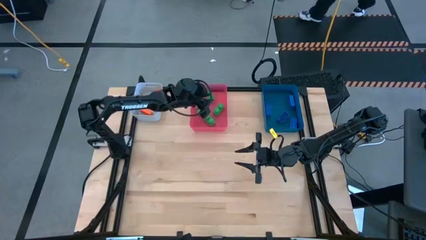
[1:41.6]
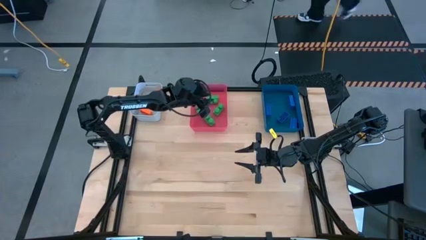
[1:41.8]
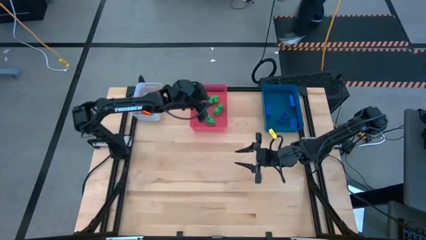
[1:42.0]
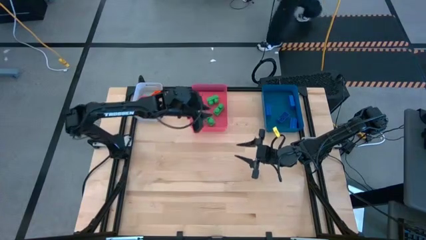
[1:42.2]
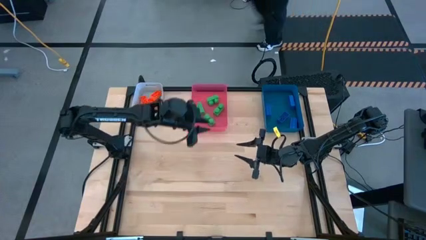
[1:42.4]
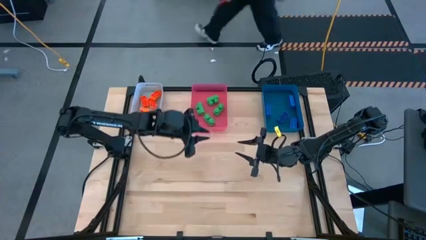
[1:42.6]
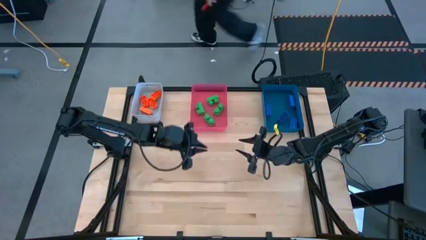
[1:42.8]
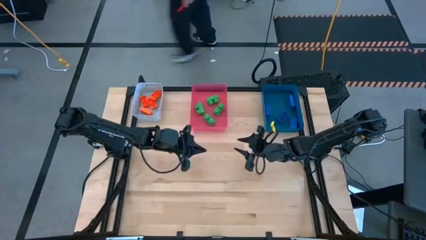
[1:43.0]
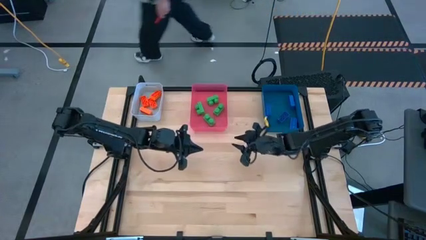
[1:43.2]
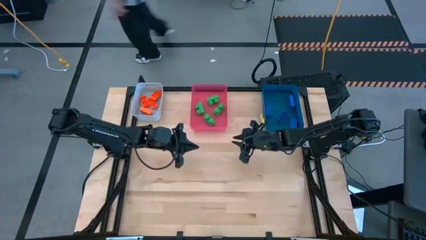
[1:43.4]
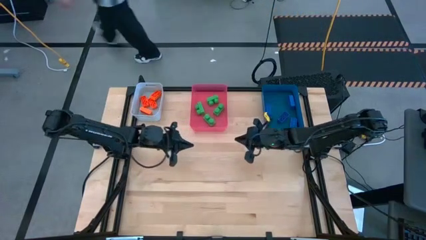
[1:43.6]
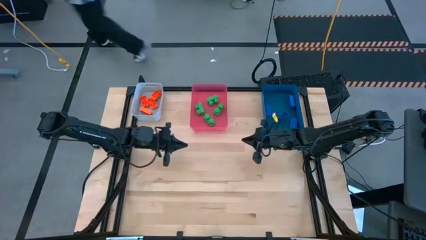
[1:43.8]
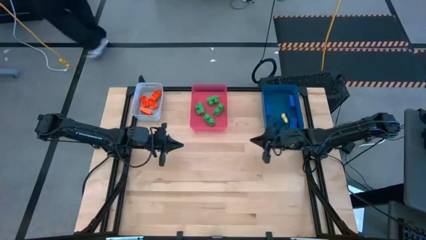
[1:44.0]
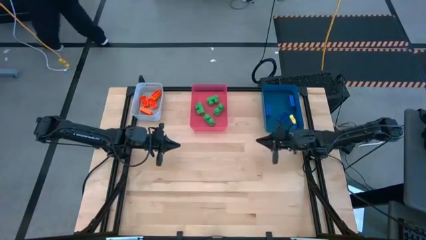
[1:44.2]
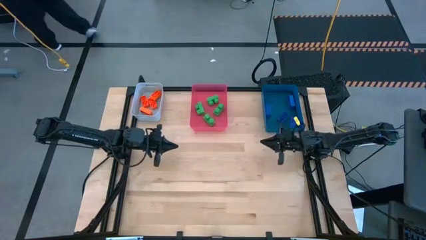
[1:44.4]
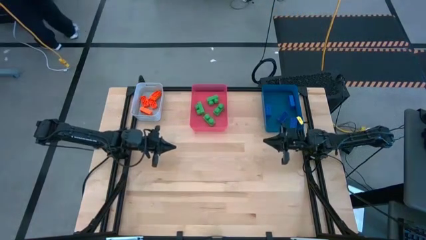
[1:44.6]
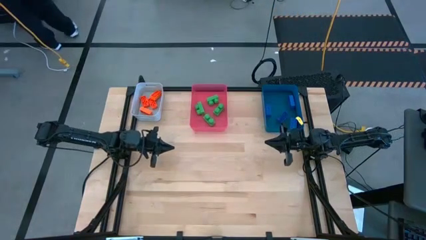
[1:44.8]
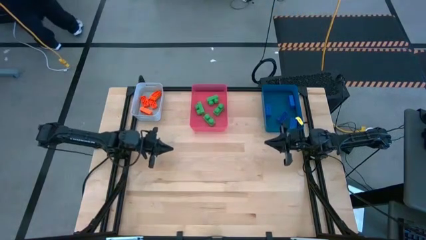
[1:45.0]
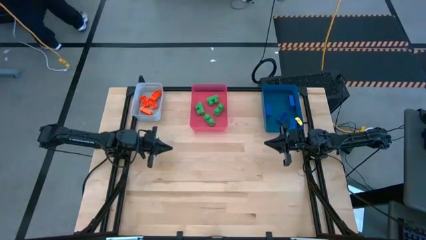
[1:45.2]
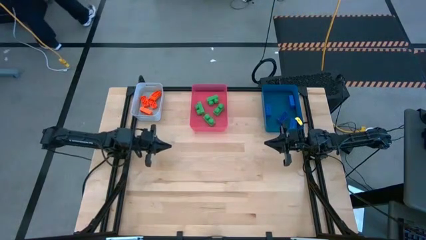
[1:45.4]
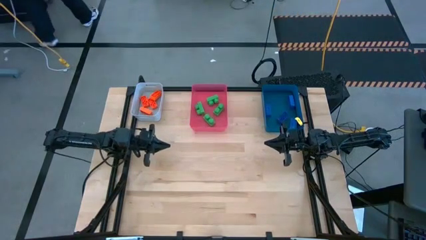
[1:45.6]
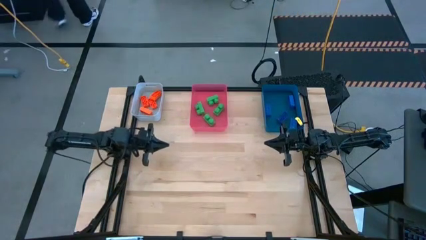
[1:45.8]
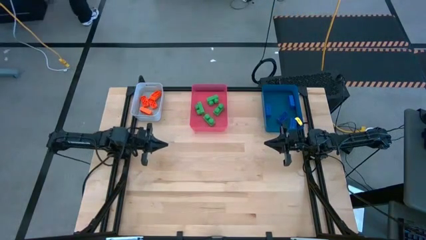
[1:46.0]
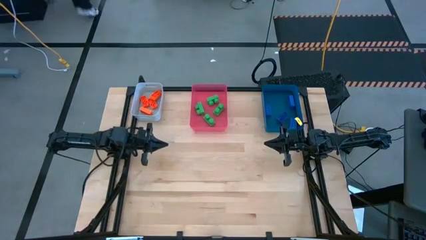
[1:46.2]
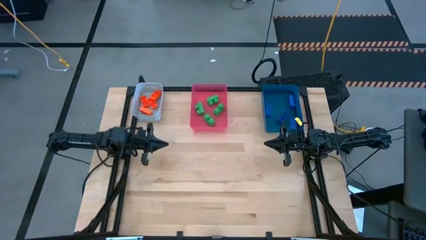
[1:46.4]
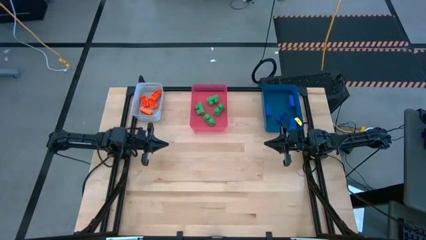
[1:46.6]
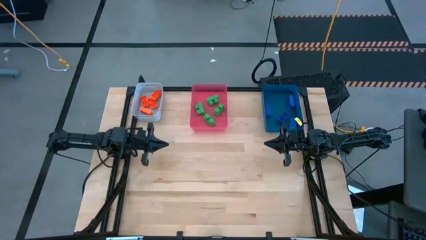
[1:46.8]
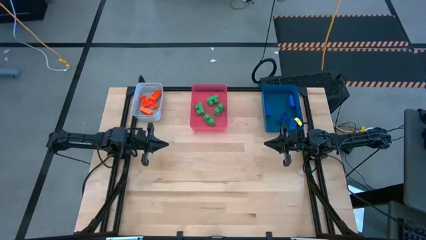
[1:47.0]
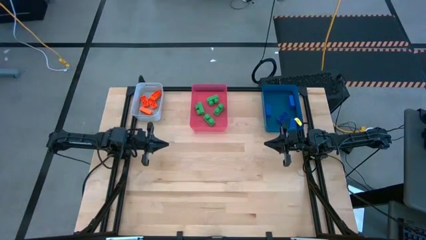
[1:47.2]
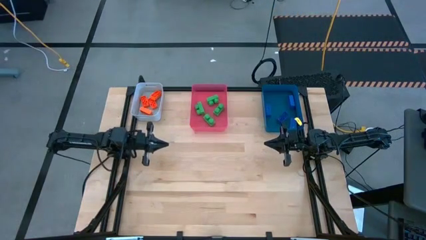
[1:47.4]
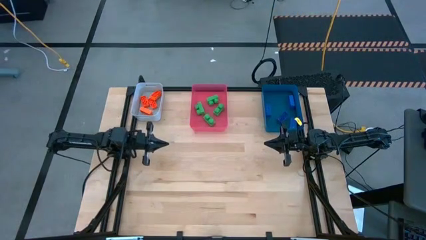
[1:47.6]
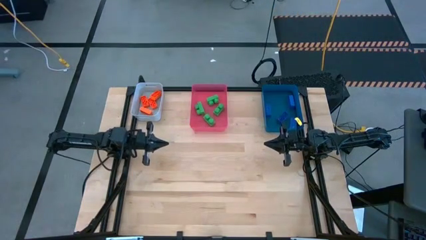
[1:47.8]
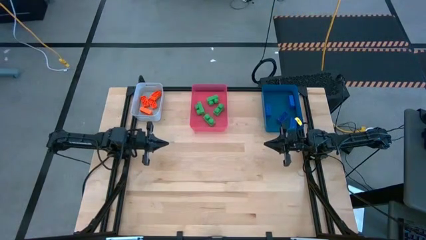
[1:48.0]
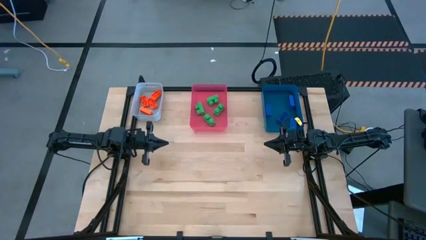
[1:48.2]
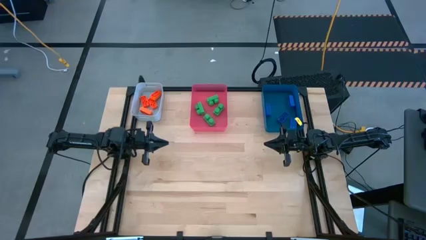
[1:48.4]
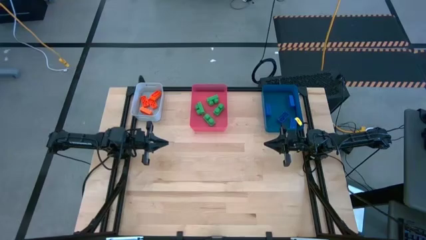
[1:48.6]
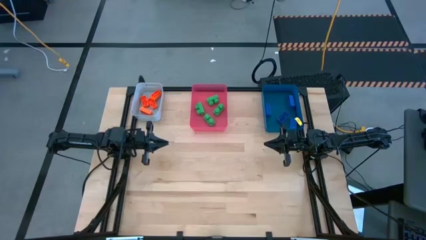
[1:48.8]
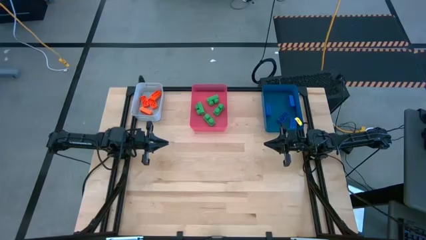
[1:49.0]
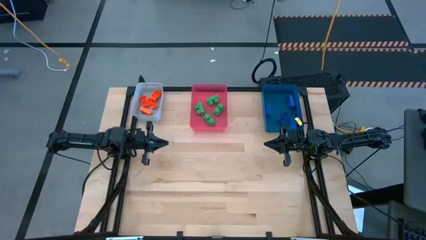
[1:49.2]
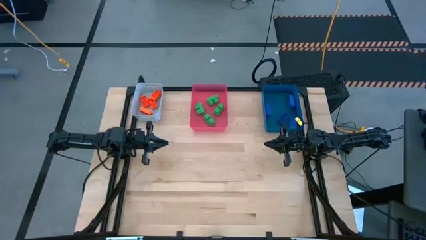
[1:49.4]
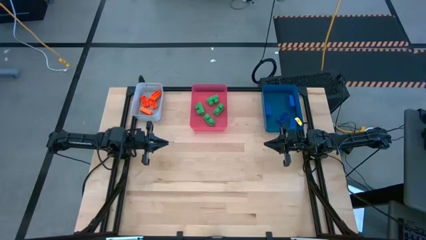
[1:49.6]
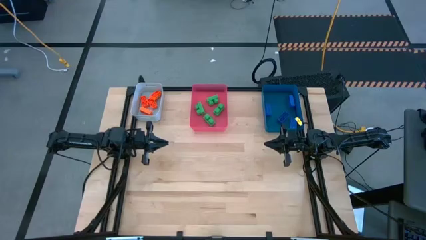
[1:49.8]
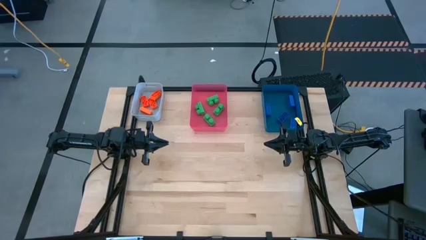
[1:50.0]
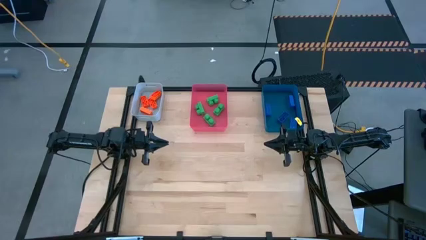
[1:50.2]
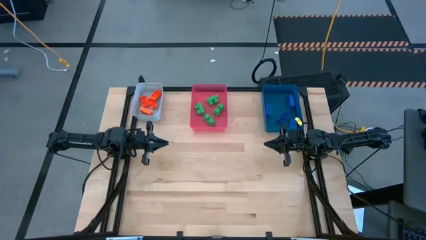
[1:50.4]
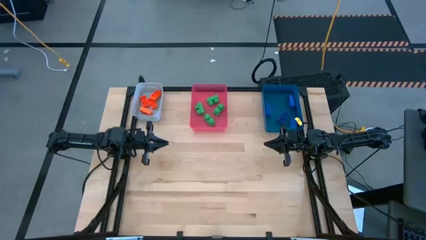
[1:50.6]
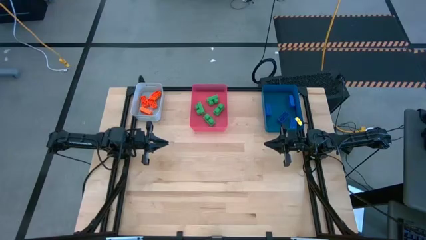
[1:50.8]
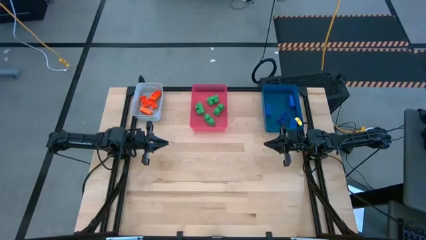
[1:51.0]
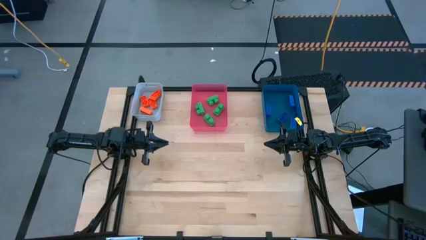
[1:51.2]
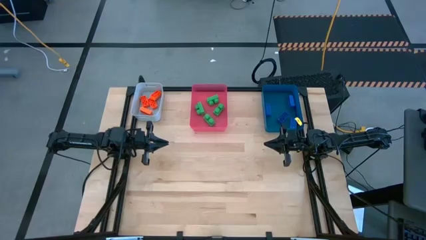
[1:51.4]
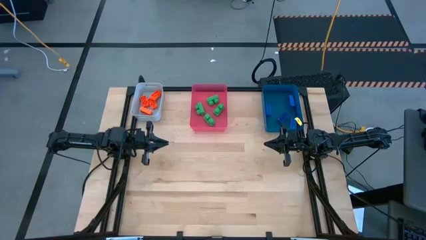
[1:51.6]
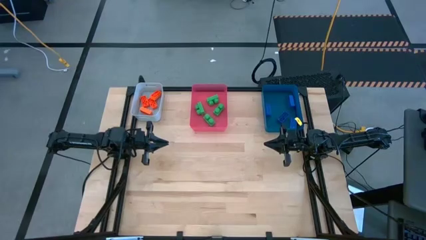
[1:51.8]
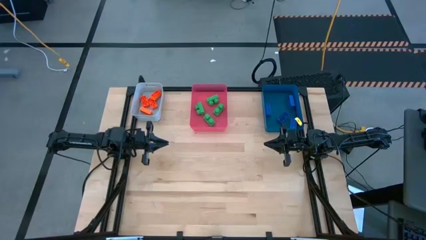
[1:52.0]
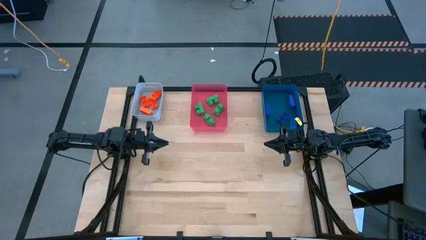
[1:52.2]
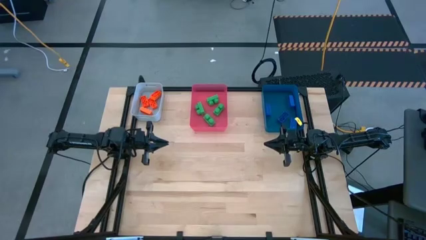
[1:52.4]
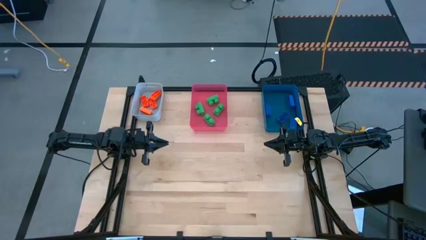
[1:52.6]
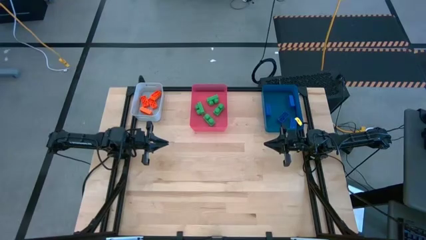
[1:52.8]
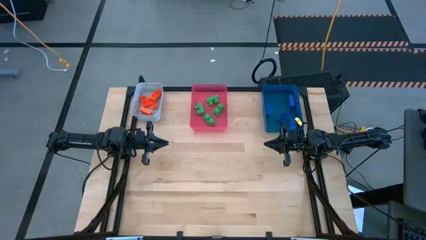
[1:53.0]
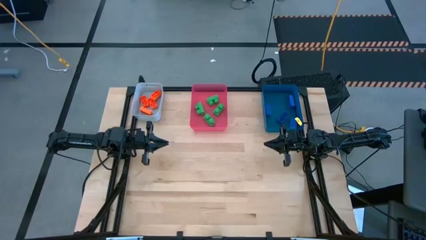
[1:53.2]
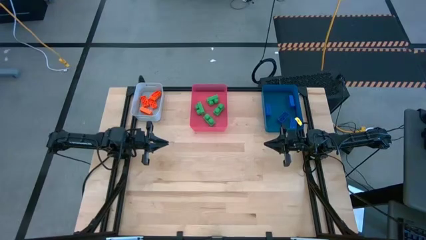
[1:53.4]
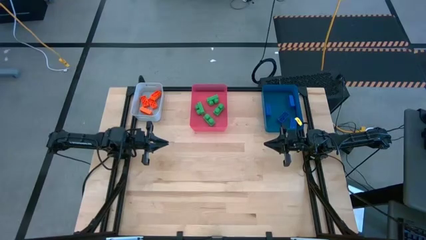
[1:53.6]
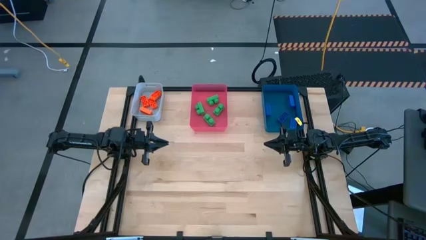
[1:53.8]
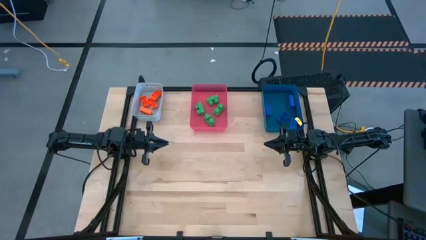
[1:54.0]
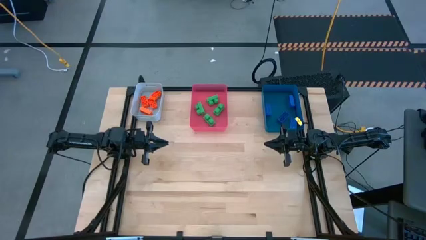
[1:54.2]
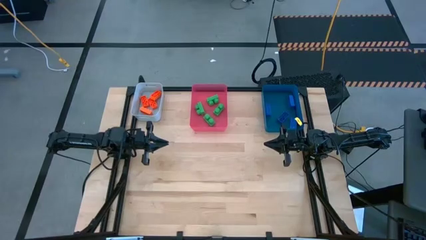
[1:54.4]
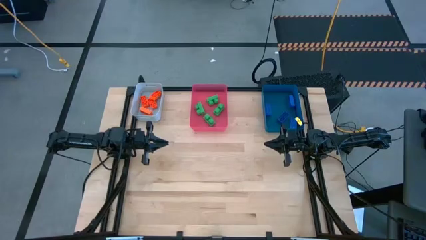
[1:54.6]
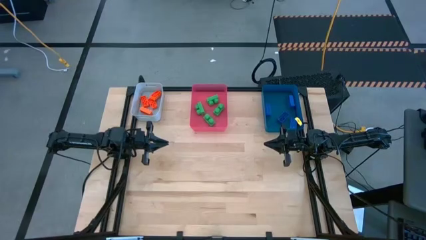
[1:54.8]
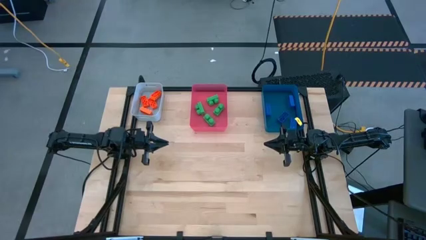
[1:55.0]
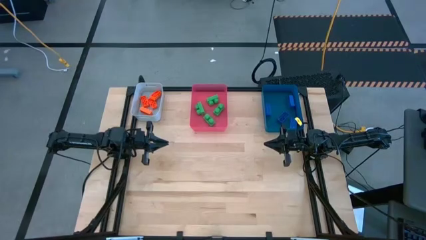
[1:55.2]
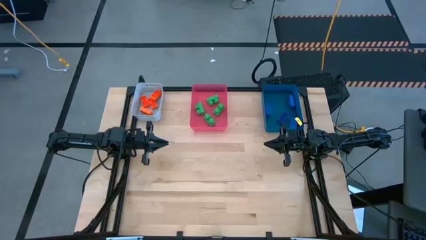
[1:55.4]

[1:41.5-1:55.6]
Task: Sort & place blocks by color
Return to Home Position
